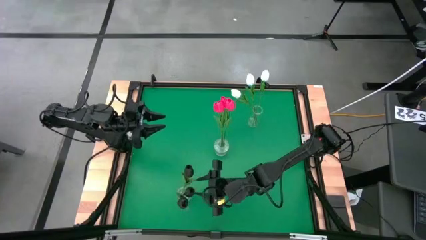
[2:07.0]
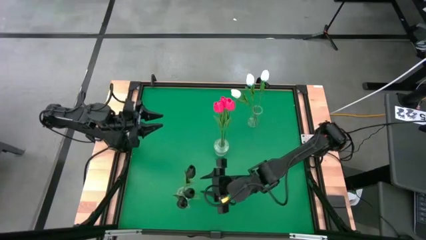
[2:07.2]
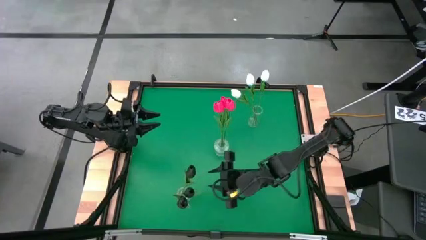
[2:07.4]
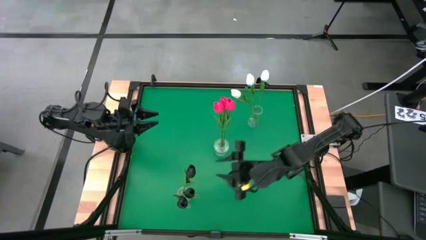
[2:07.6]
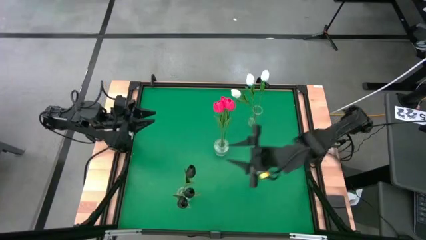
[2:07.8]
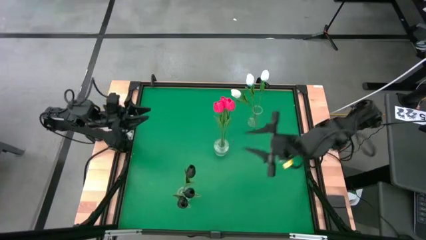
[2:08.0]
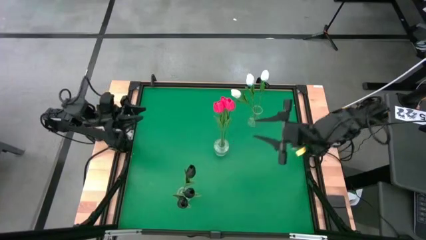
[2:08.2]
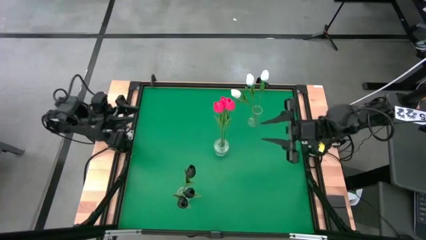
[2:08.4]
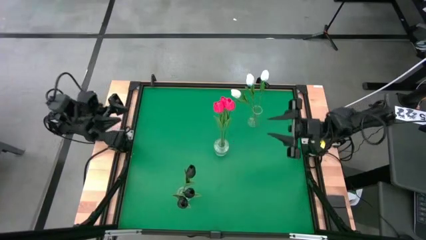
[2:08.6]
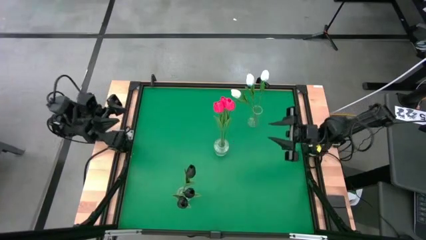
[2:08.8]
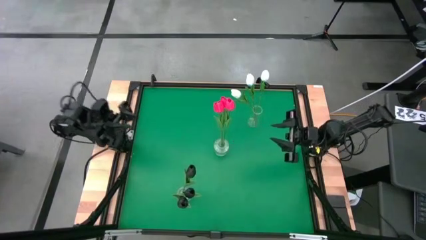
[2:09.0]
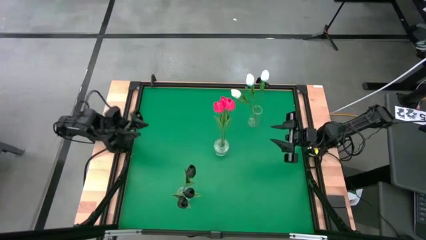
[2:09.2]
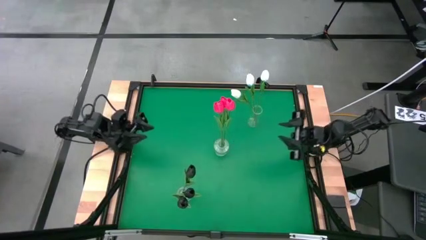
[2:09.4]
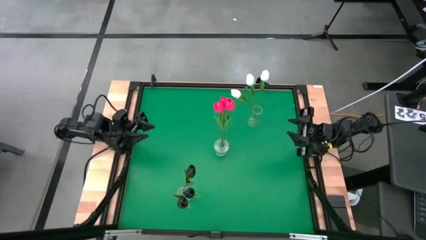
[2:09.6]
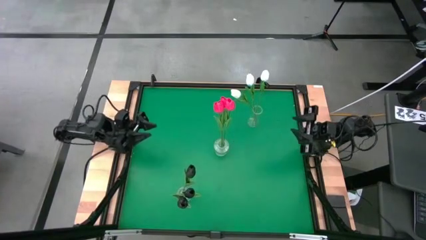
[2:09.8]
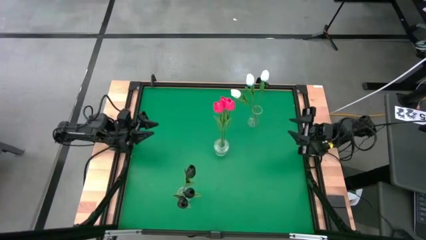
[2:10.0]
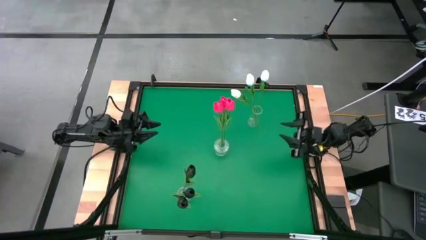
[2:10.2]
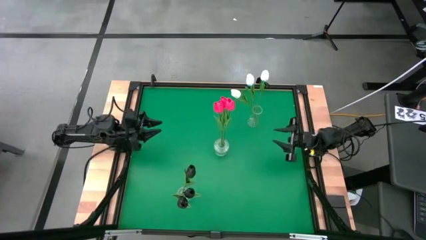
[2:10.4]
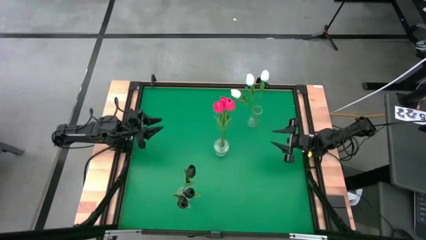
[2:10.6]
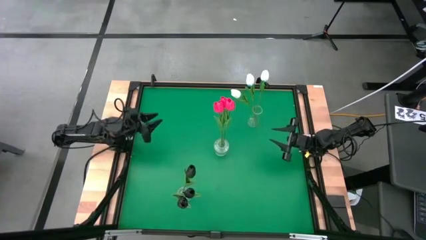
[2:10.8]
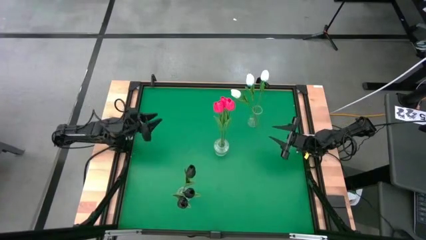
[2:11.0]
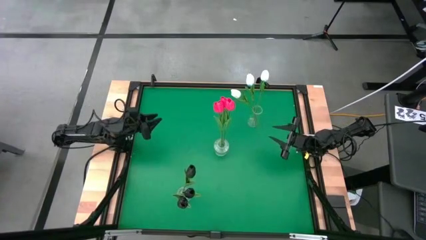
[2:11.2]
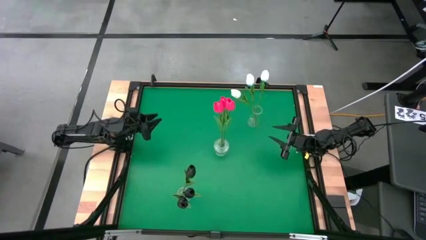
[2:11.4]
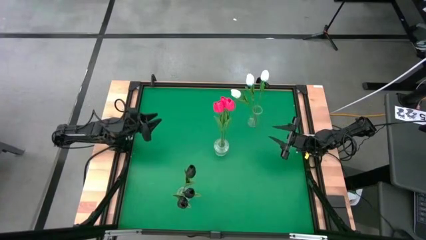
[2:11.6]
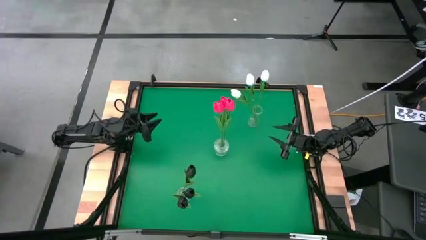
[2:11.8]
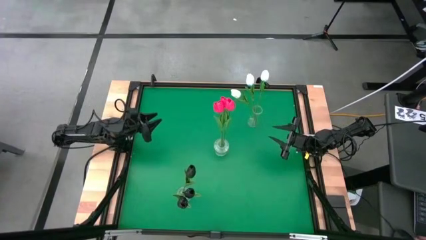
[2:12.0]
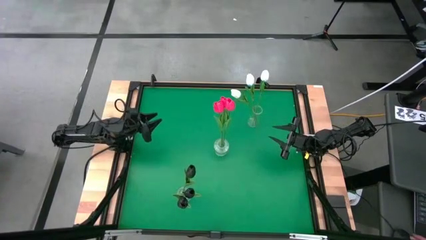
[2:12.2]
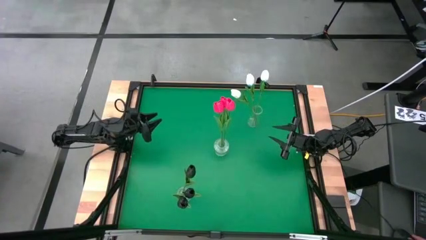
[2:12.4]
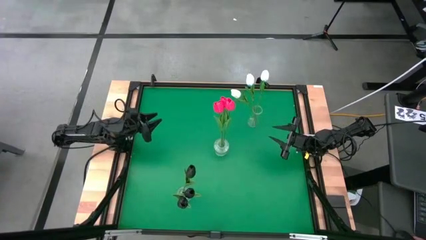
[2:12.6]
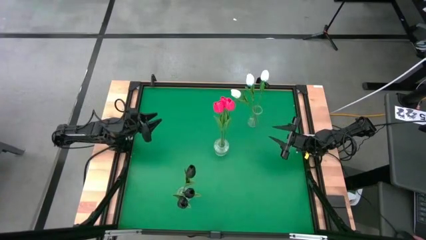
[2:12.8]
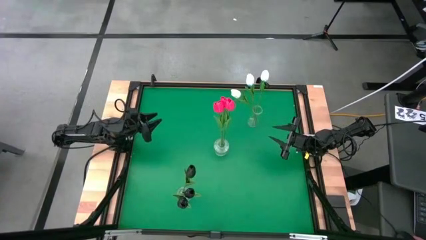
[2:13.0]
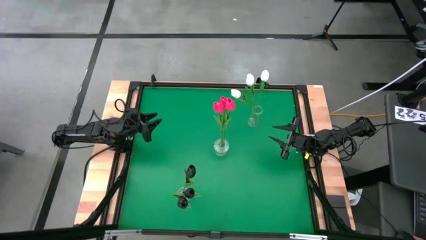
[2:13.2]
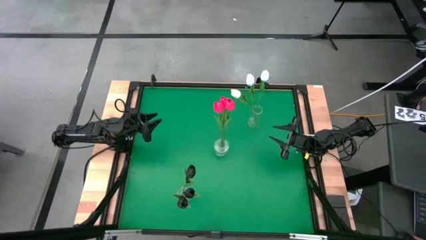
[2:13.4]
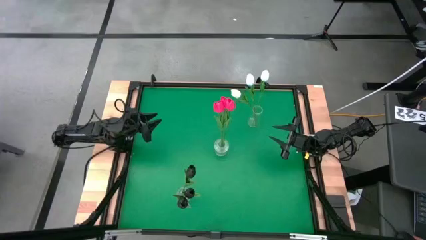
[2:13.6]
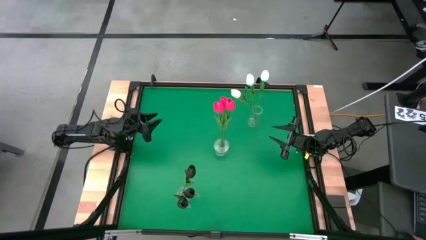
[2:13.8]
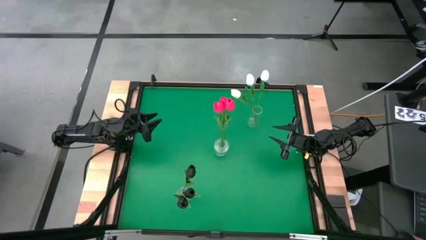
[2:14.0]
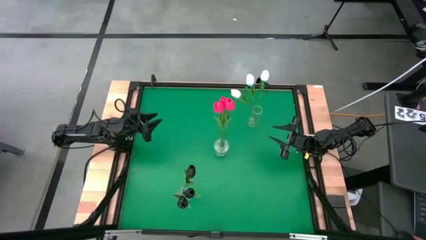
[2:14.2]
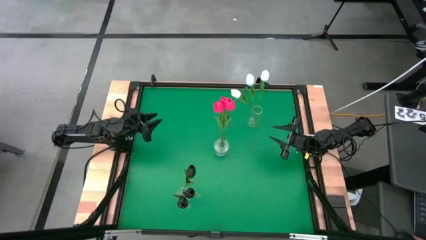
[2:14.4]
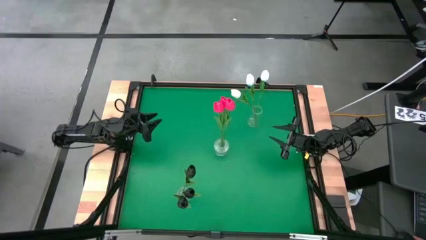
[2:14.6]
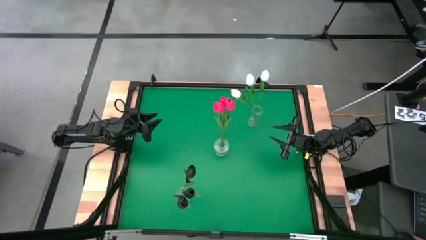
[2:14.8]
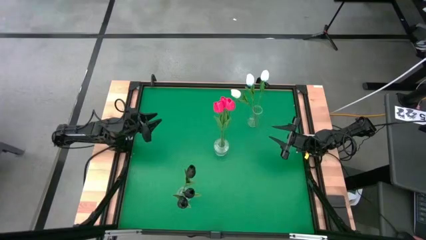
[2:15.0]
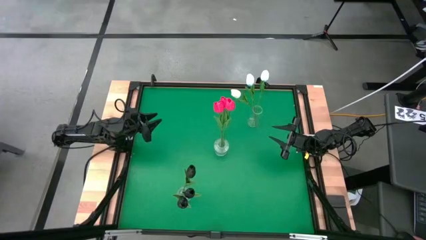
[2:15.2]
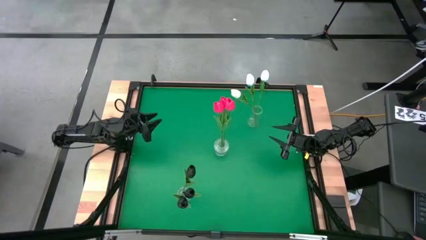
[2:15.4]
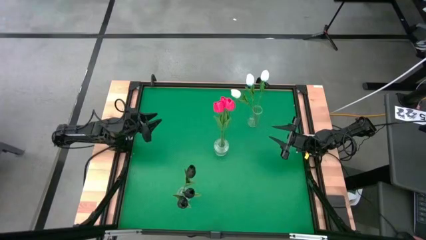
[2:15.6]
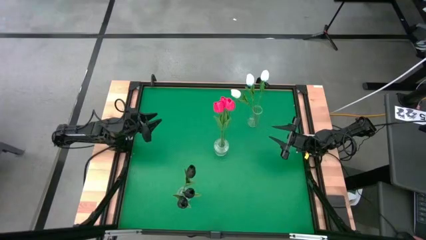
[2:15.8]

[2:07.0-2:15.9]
Task: Sort flowers into vase by color
Return to Home Position

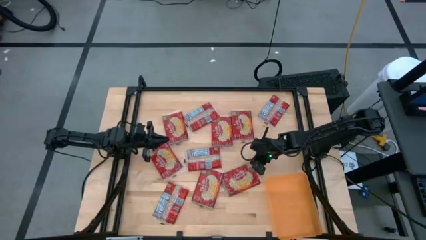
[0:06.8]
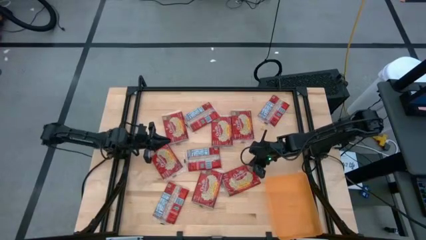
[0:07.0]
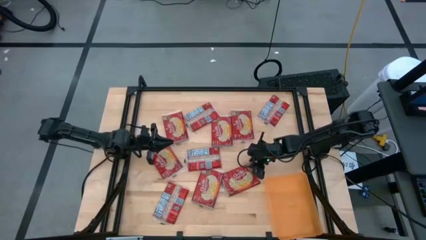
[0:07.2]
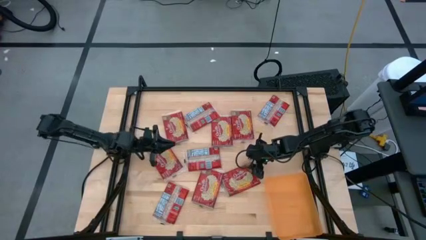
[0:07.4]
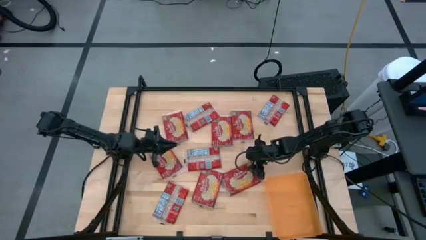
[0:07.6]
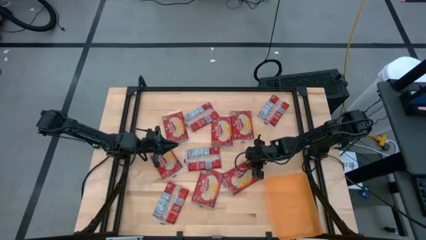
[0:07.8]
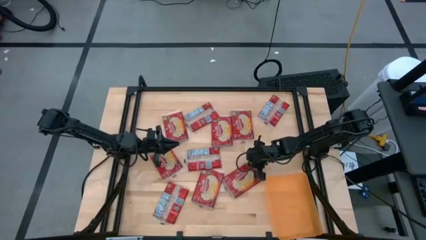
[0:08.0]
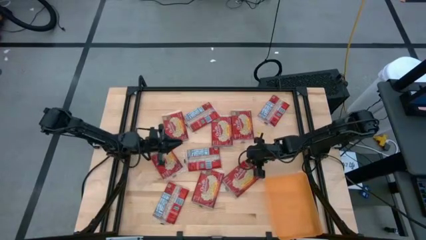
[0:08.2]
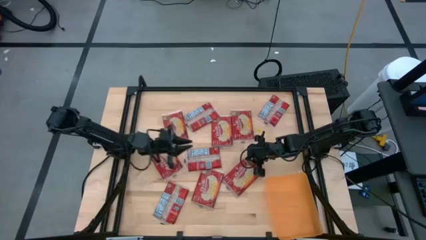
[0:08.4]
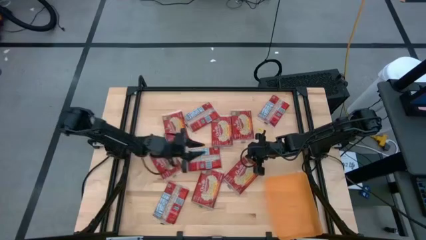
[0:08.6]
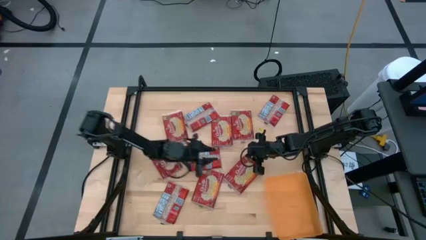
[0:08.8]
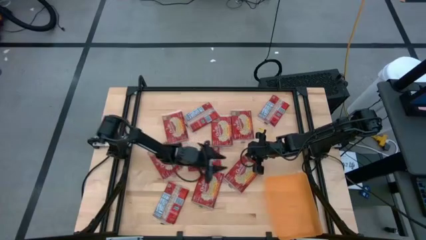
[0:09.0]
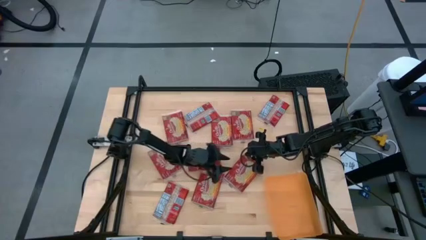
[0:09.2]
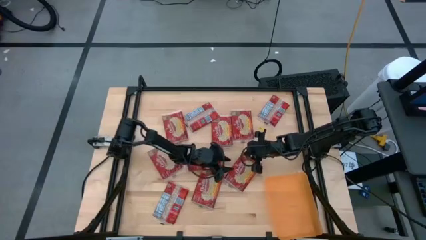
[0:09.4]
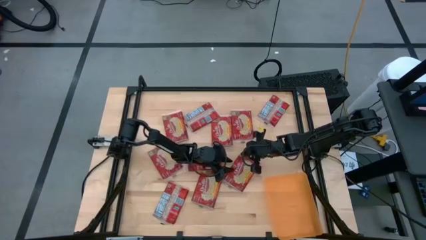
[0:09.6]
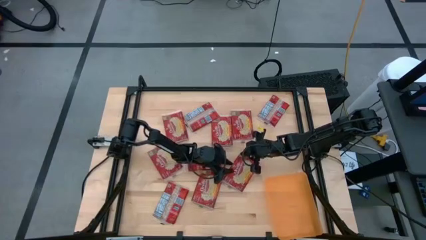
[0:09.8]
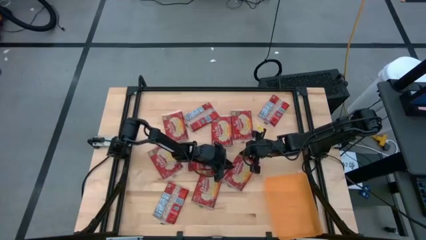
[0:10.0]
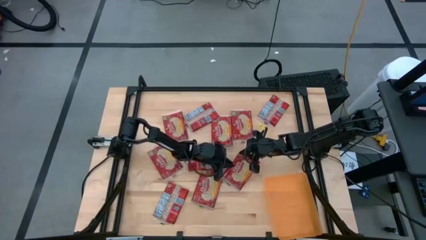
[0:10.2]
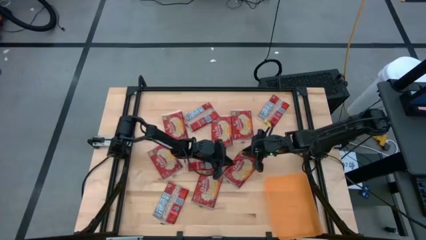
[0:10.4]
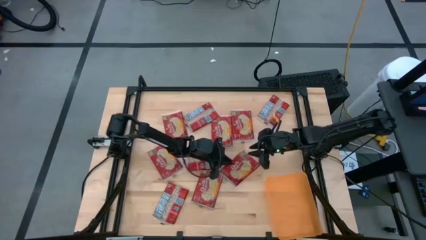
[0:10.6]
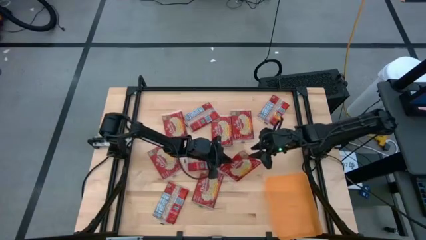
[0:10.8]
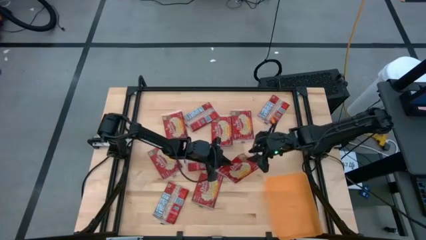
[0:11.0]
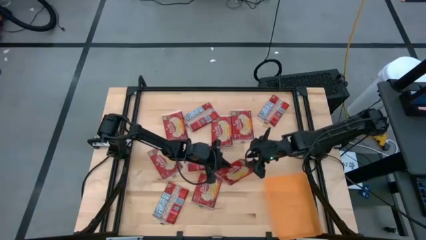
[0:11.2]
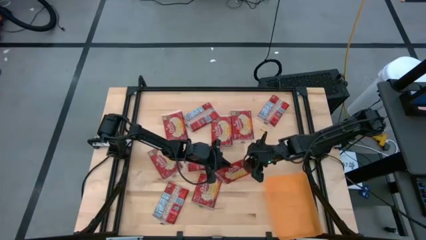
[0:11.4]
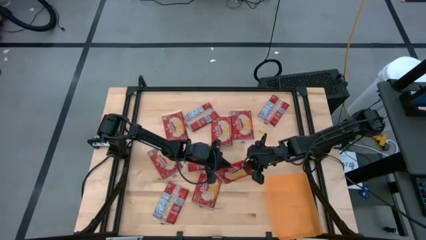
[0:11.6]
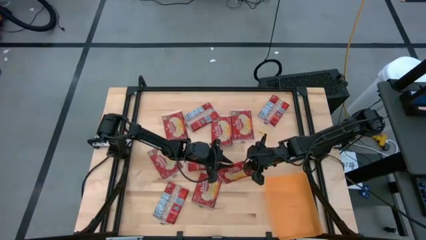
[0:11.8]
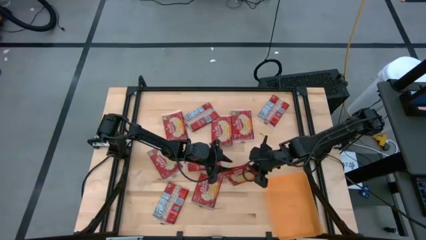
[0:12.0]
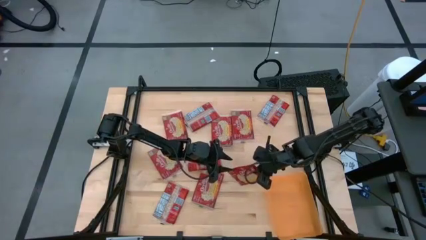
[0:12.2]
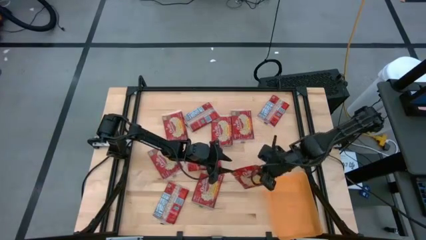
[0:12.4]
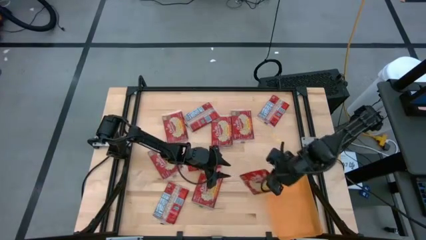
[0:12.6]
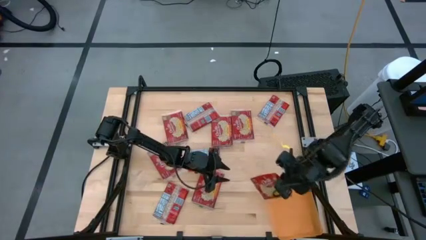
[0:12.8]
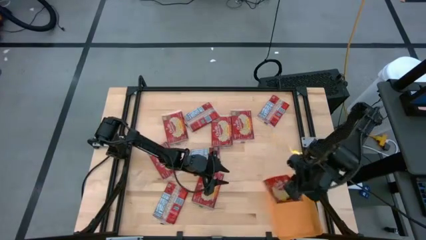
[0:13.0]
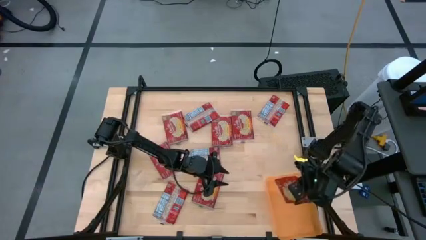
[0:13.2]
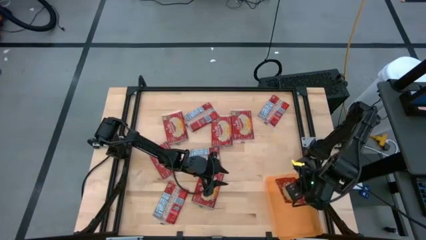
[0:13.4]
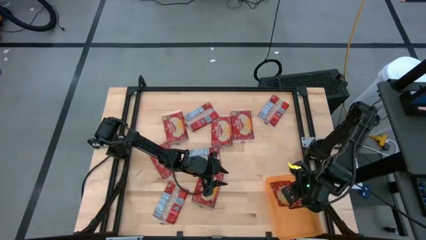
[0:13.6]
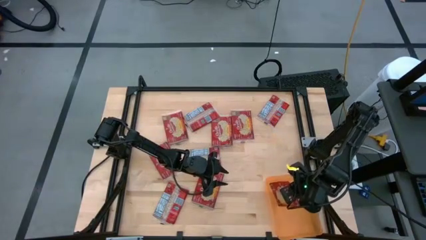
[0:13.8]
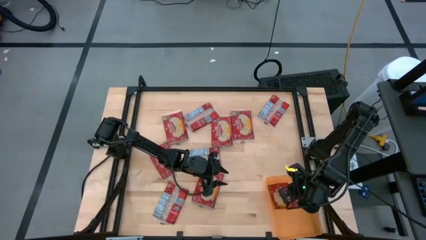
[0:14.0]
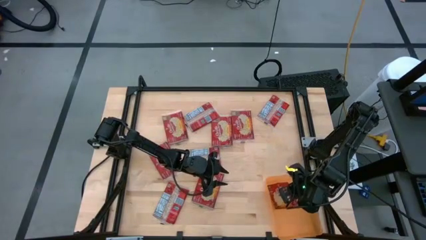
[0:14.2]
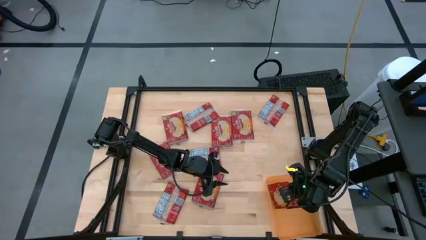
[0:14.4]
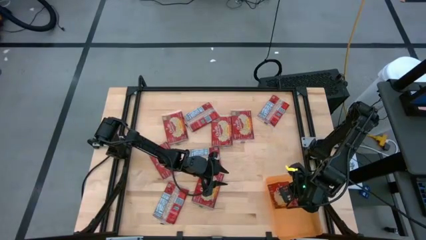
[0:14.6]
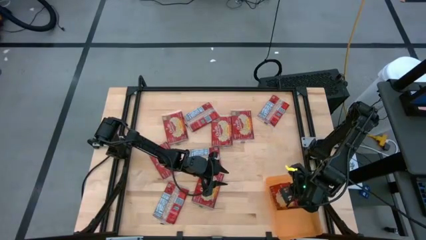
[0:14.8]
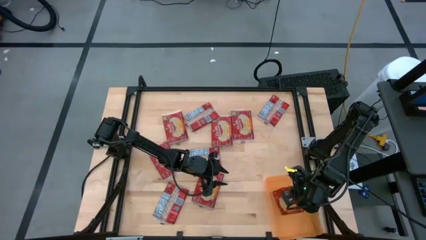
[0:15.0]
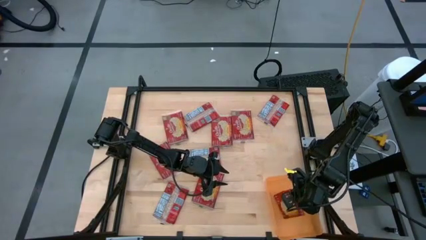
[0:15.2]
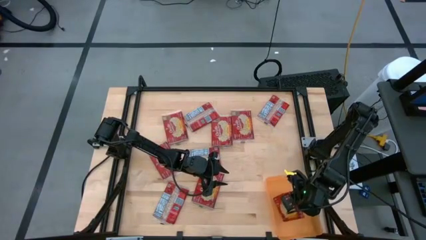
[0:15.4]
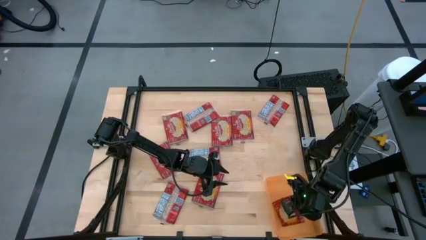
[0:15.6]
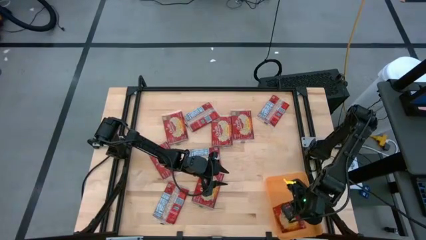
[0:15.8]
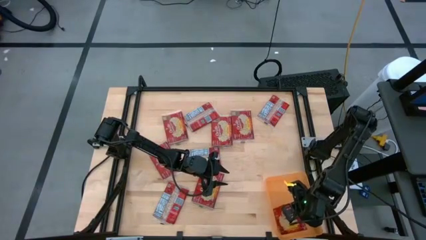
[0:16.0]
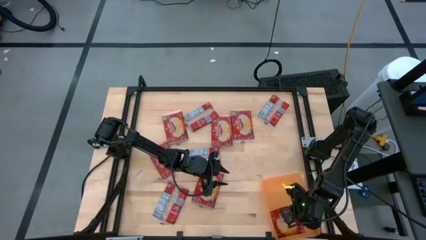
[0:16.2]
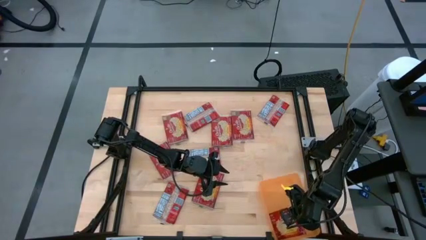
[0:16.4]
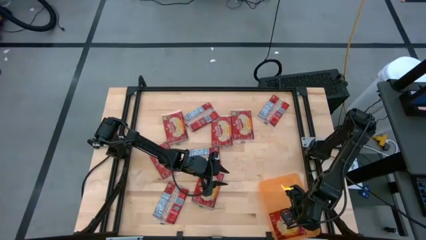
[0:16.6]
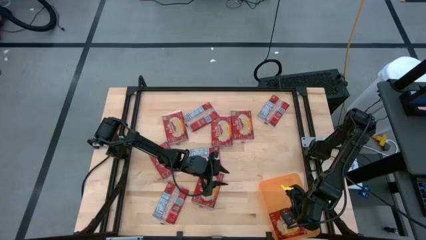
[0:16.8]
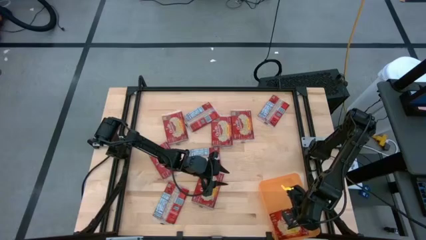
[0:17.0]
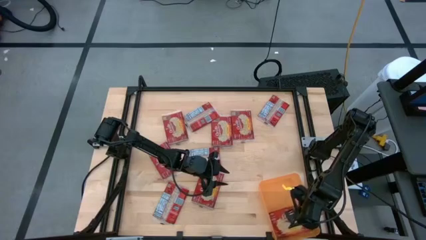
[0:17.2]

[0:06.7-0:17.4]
Task: Sort popcorn bags into baskets
Put the popcorn pack into the orange bin
